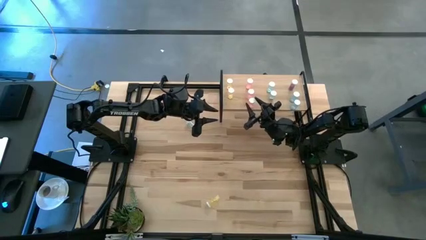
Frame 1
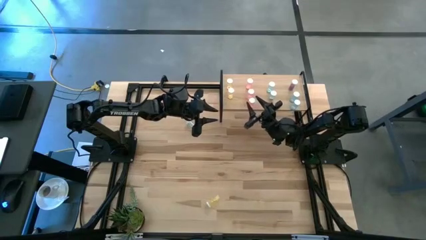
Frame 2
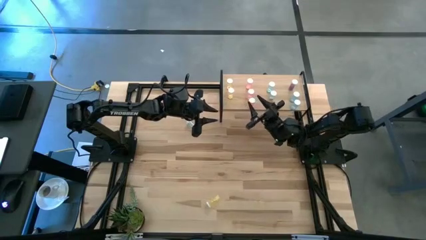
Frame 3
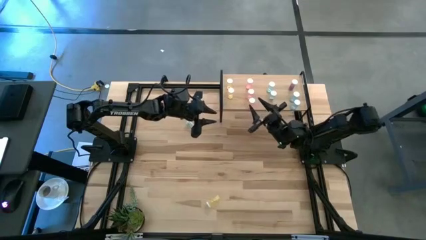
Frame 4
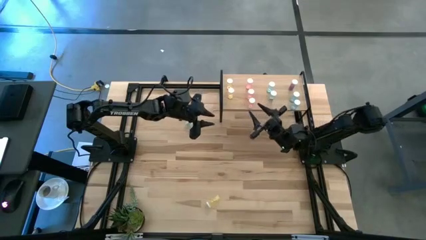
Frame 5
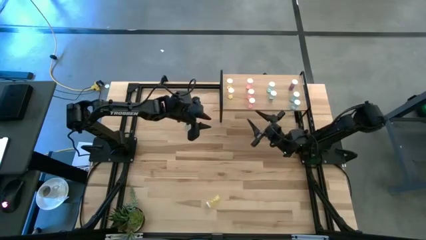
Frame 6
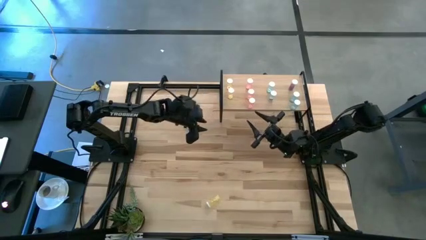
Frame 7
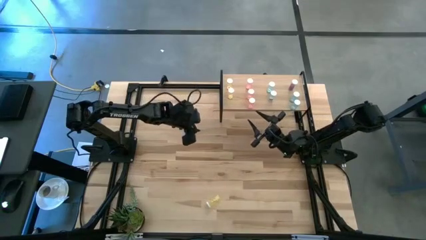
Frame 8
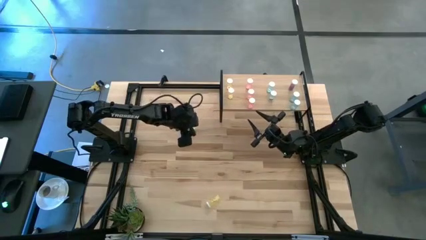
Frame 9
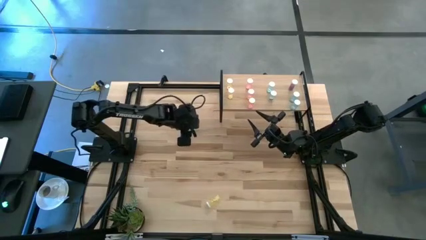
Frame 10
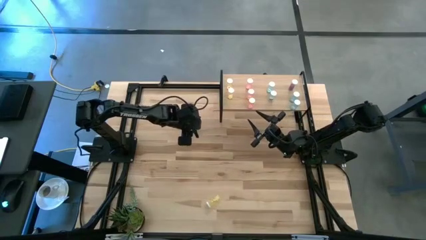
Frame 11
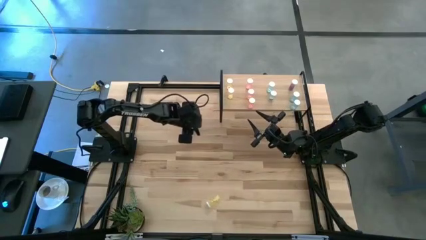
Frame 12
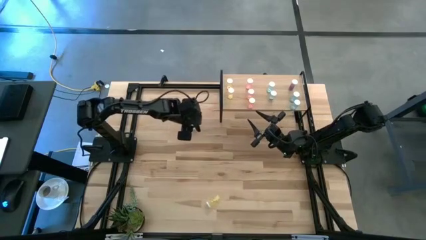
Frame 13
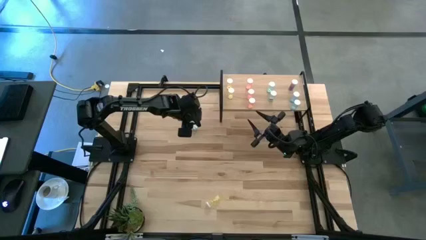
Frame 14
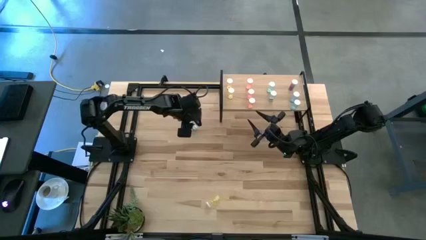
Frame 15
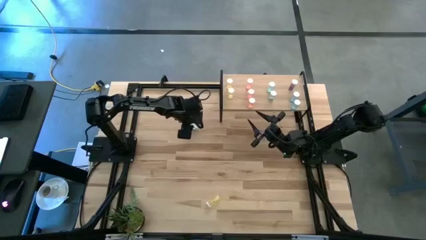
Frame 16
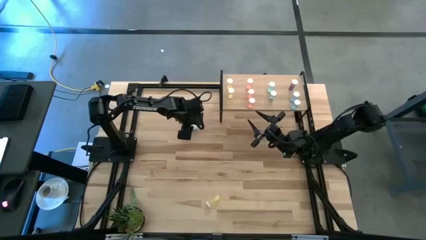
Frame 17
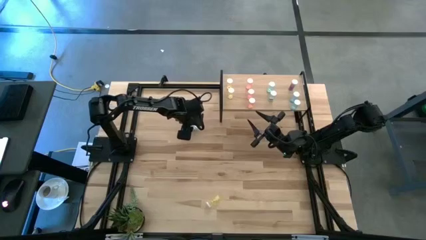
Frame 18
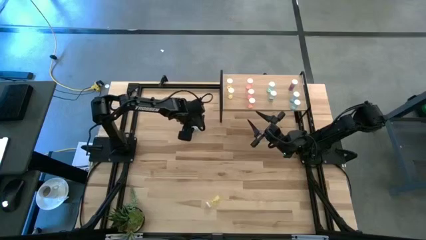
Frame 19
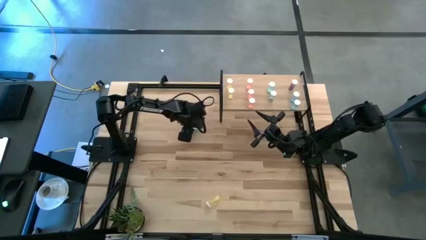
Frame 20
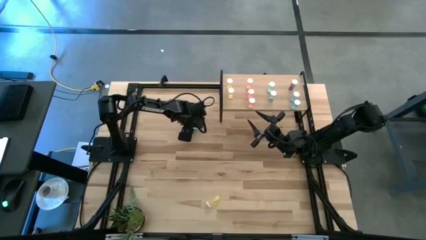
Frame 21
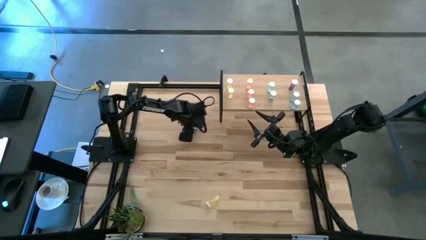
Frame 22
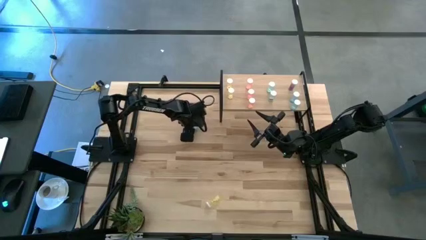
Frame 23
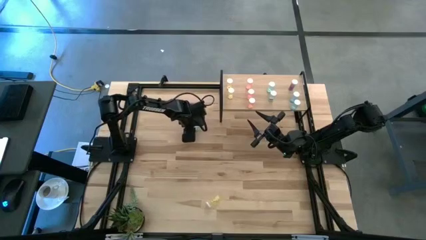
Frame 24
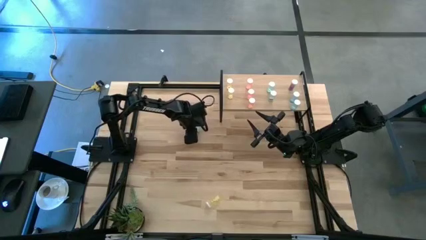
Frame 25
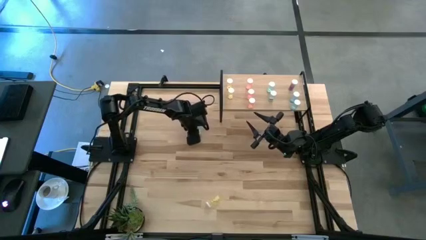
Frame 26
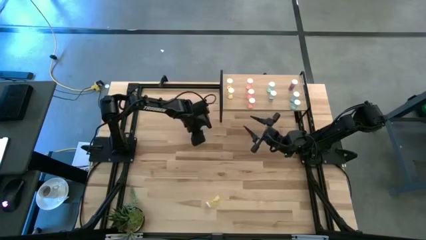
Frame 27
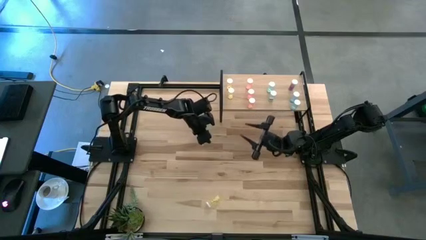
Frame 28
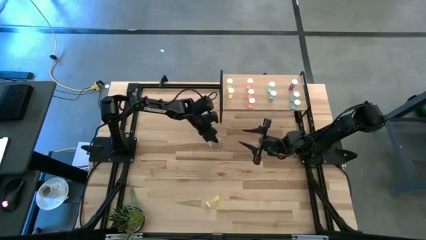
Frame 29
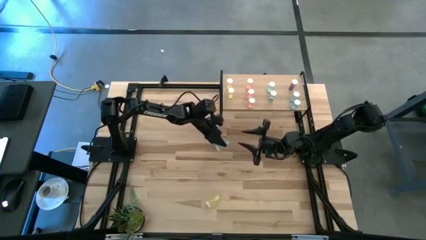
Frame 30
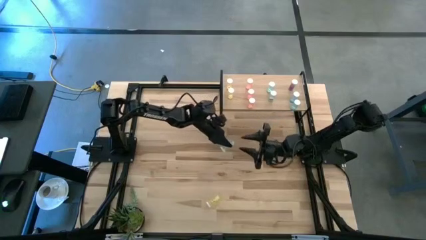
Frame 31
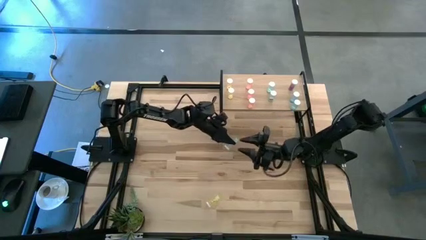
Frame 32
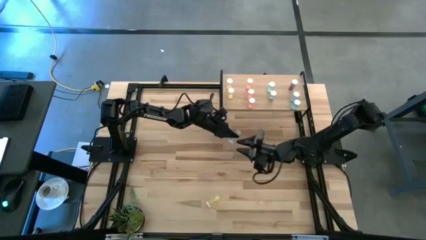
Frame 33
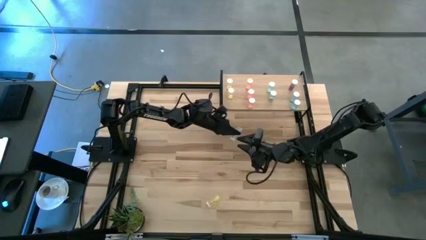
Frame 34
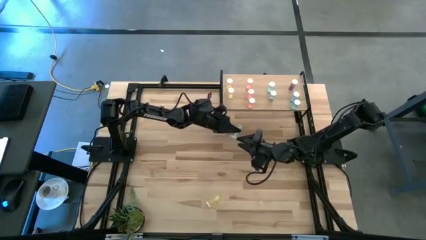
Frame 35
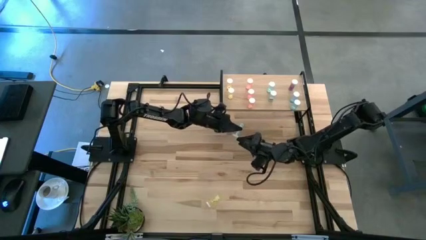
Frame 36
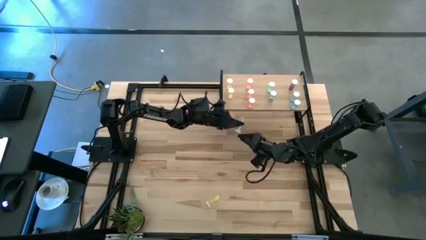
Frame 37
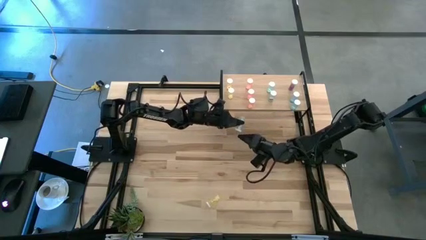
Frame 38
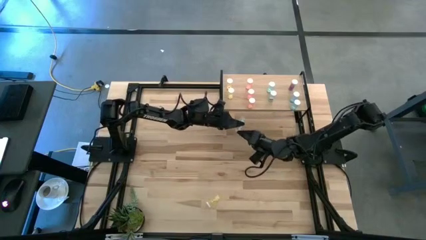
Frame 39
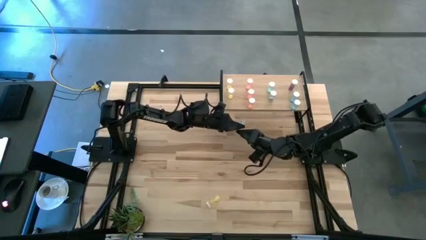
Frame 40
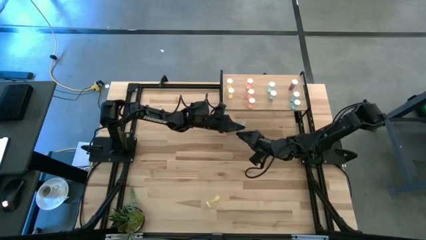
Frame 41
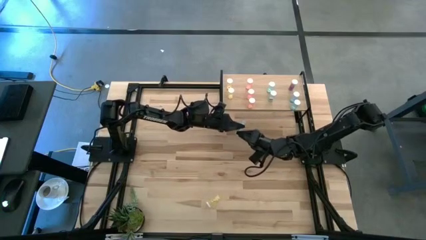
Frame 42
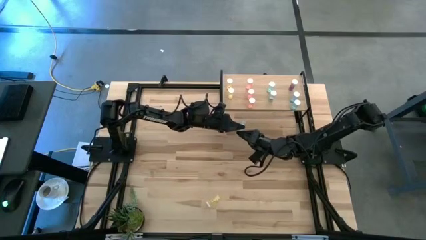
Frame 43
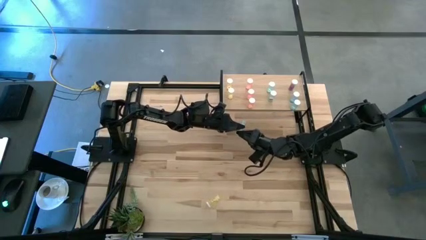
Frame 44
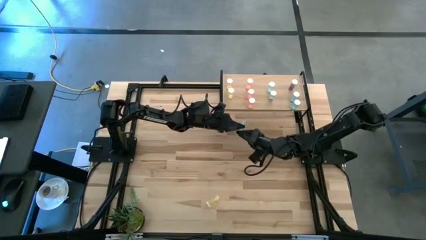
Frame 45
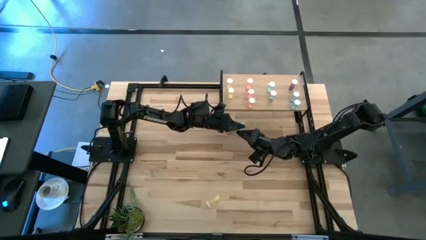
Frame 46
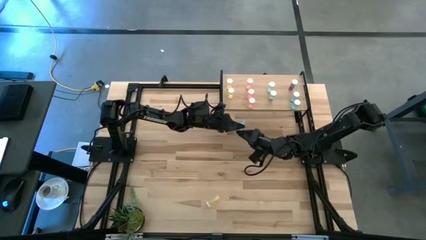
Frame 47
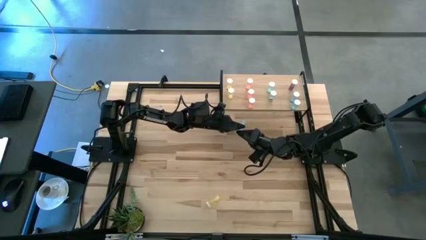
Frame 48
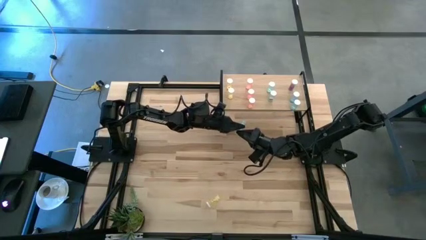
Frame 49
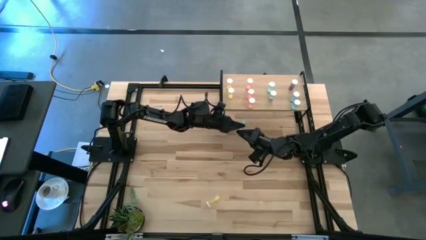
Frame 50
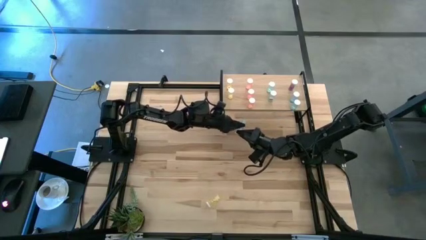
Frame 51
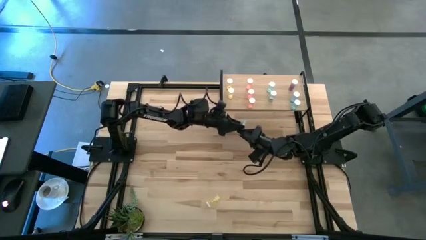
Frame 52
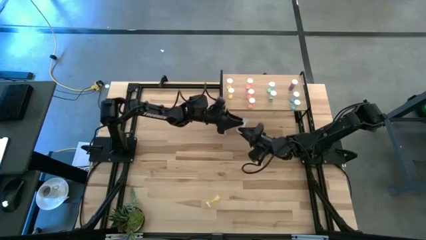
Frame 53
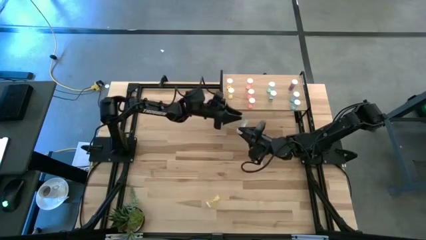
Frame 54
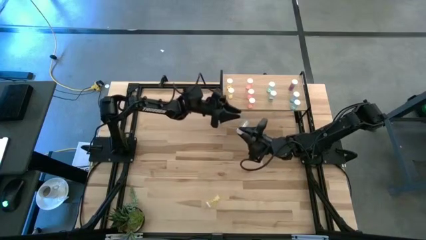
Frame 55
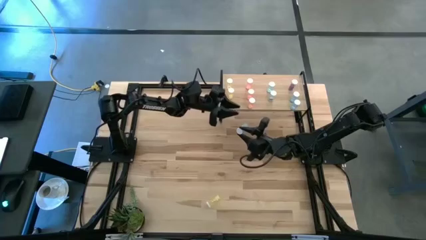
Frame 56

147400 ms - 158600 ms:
Task: Pick and place medicine bottles onto shelf by color
Put the green pill bottle on the shelf aligned with the other green pill bottle

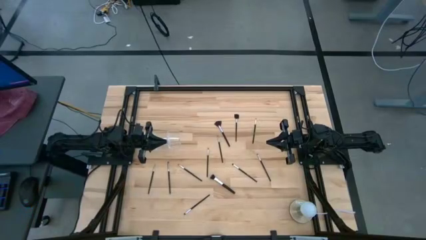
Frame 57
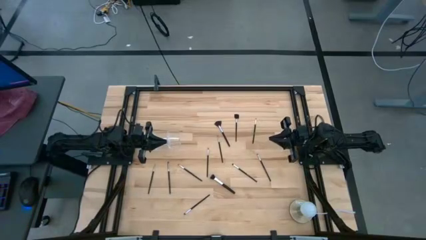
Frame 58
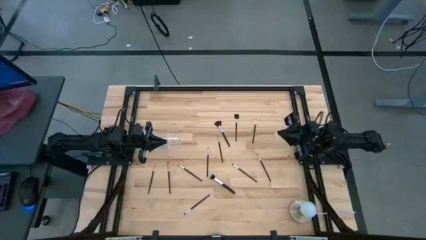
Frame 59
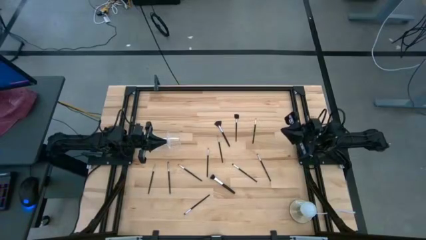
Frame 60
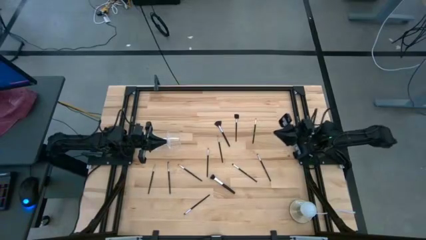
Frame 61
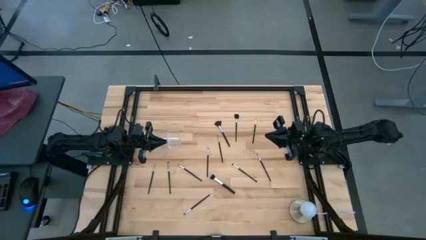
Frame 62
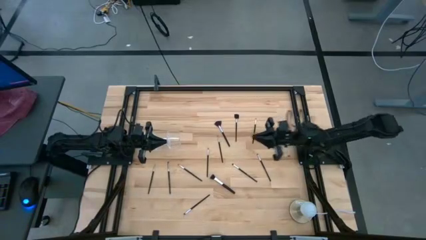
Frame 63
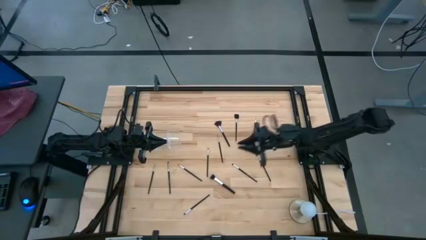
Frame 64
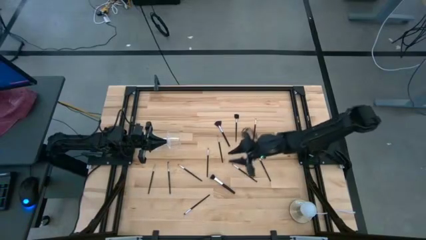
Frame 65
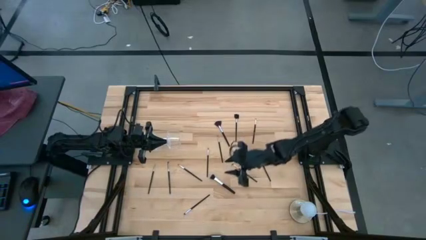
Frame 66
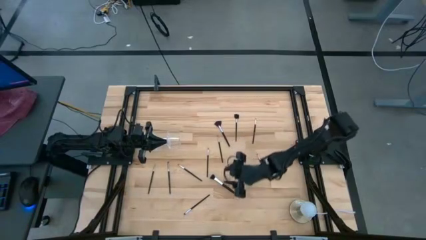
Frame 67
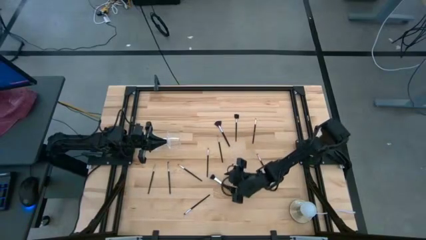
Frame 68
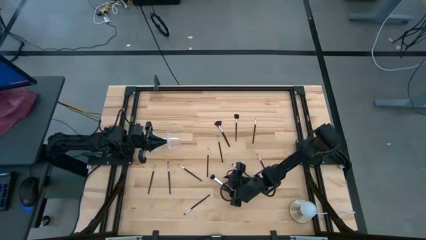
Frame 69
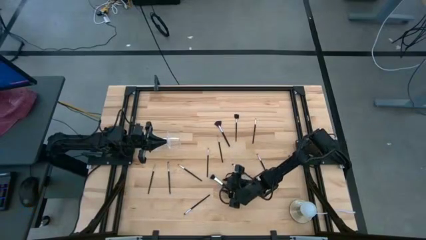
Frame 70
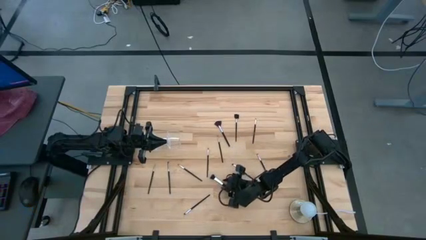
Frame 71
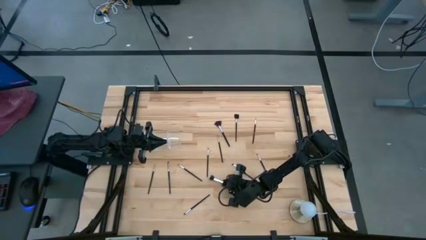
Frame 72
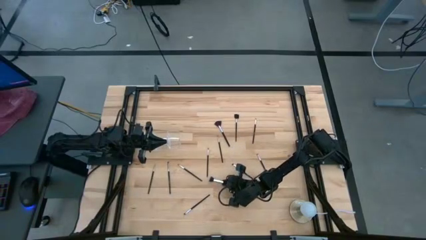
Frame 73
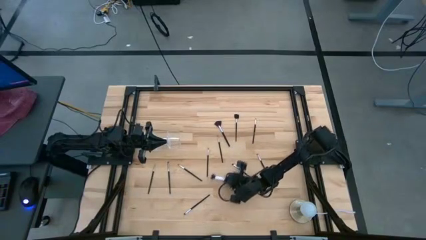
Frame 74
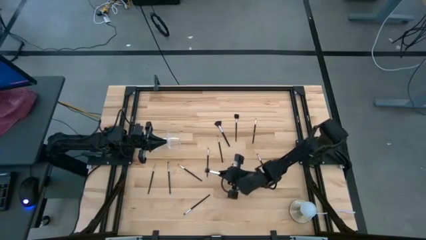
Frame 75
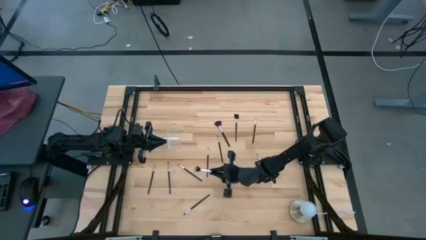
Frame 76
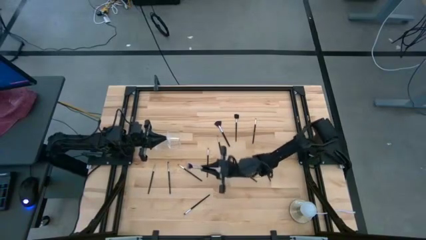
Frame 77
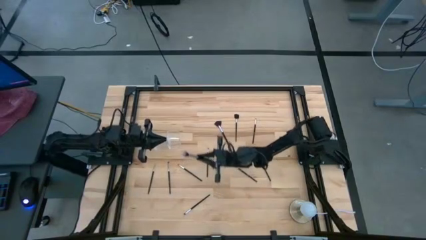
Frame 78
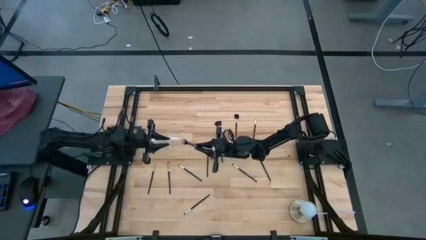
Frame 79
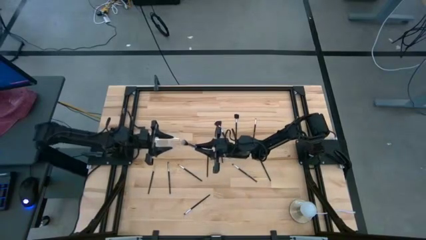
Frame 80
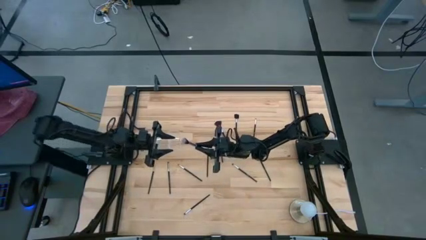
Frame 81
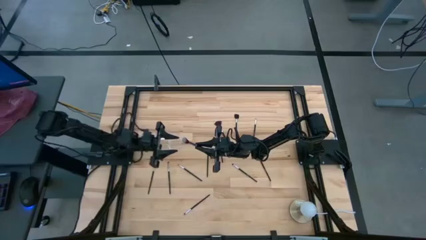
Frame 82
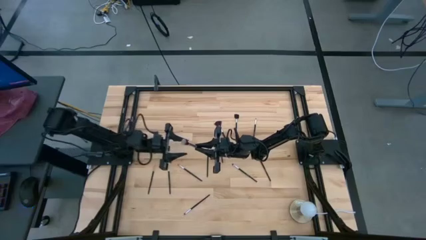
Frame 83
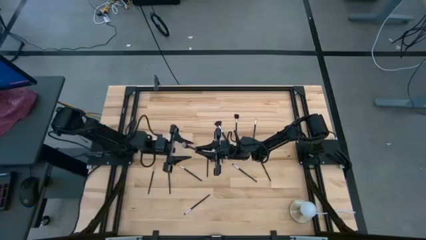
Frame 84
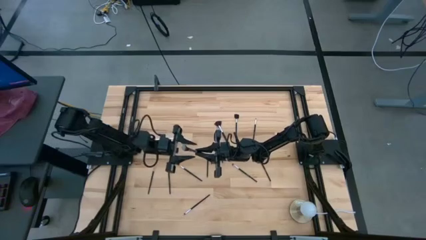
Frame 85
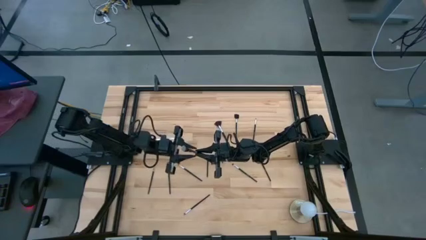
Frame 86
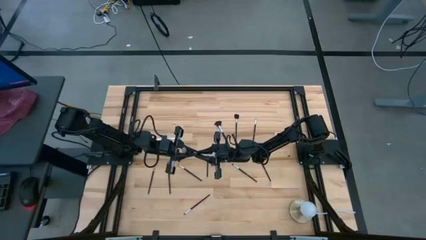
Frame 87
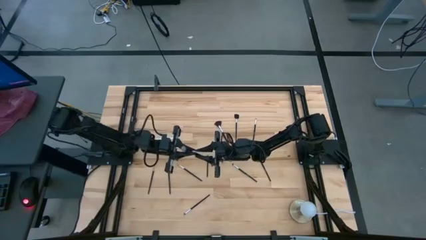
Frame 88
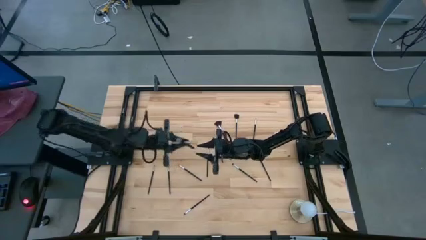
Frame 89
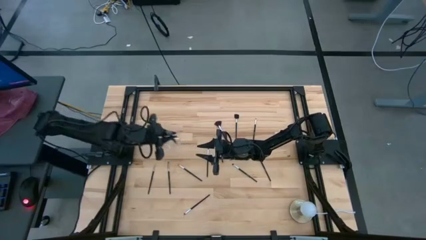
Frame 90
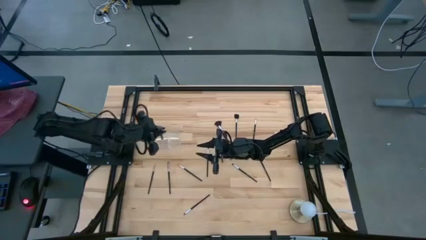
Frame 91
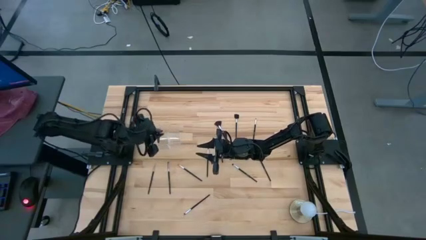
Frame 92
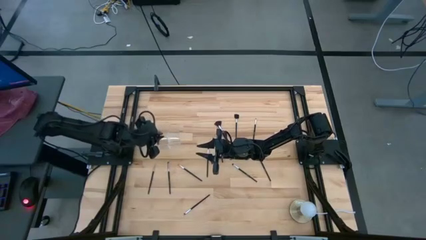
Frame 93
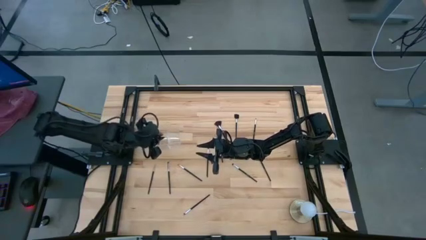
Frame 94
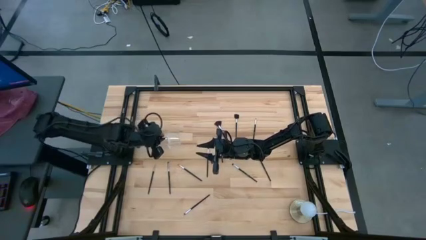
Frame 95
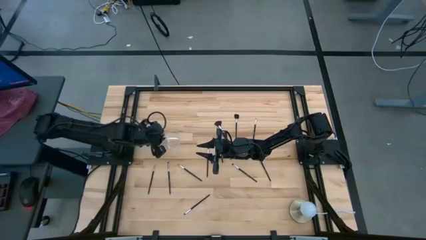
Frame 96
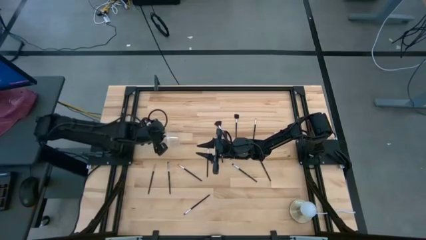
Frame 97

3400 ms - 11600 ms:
Task: Put items in baskets/containers
Put the black blush brush into the transparent organizer
